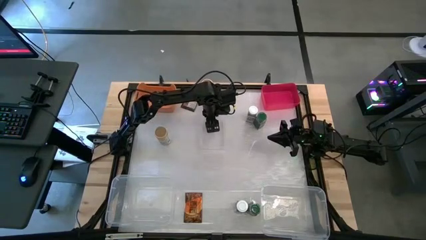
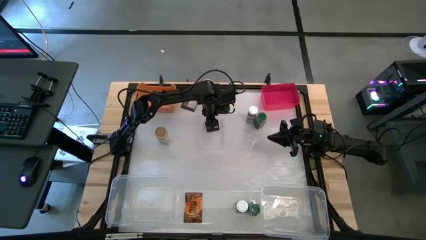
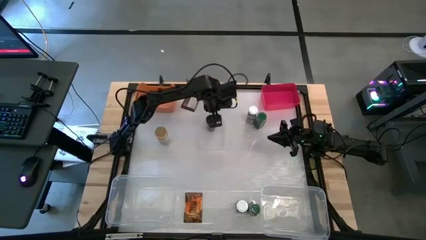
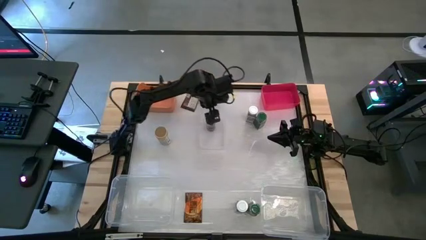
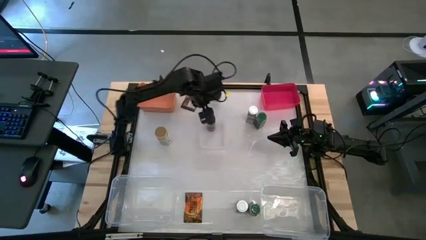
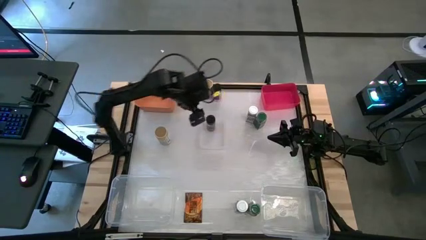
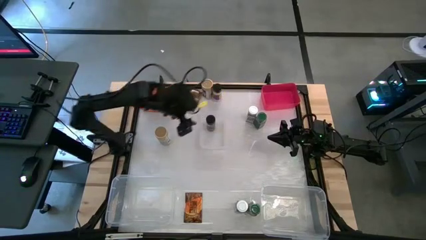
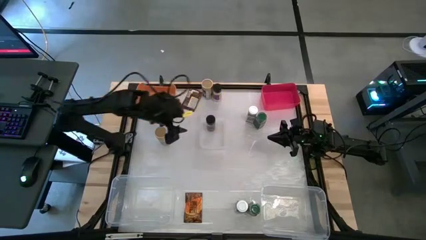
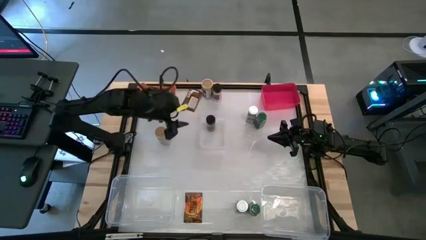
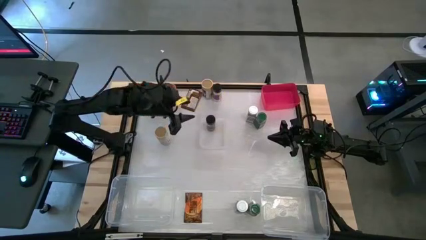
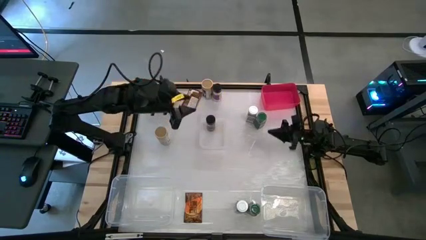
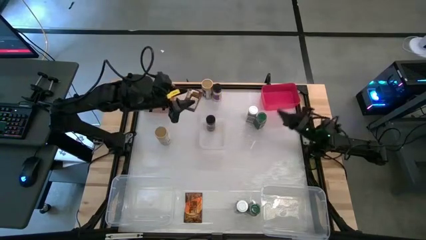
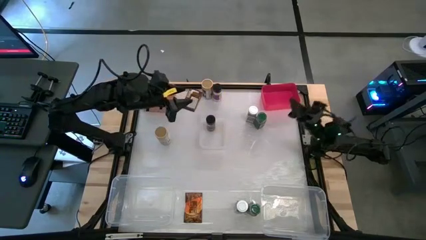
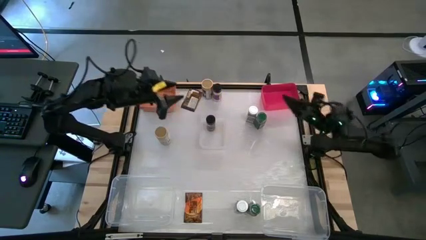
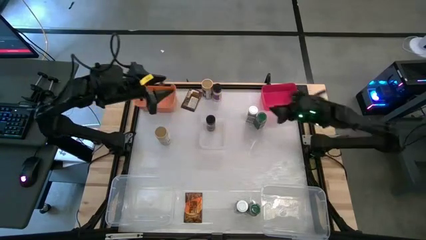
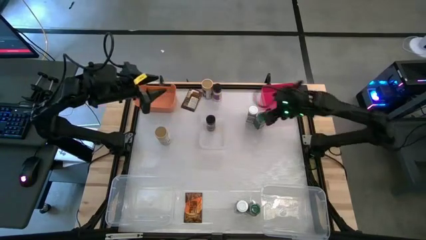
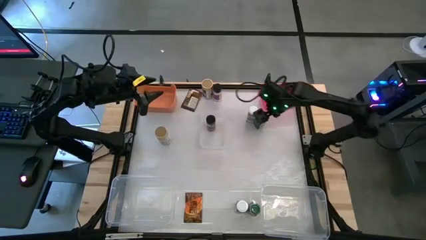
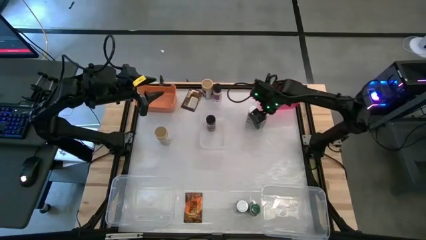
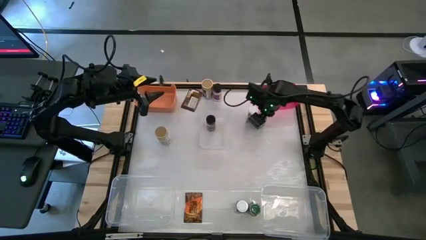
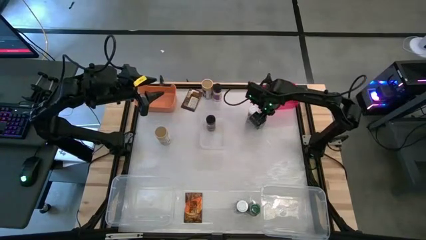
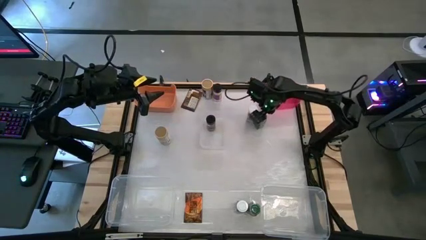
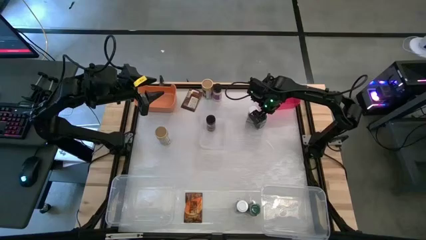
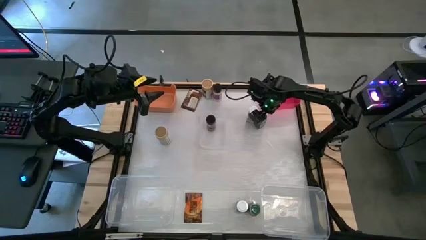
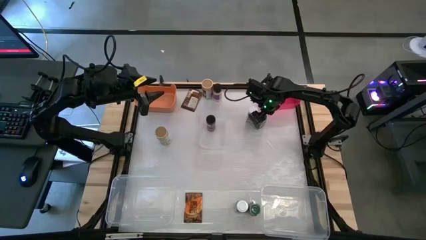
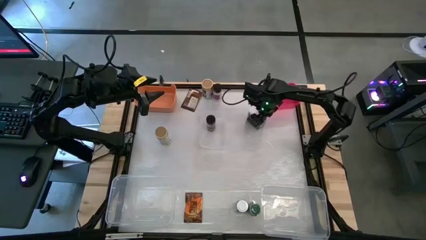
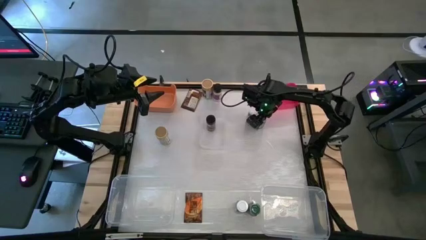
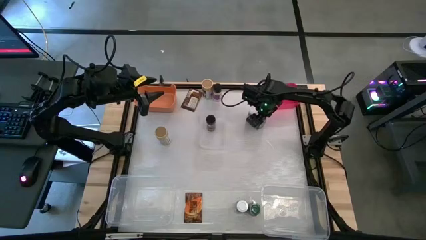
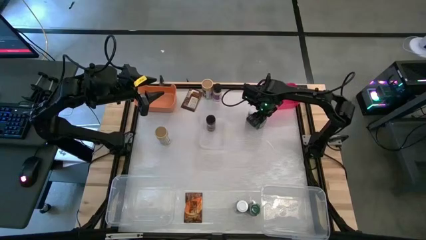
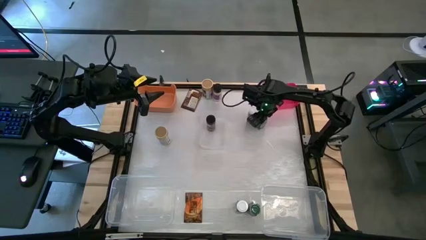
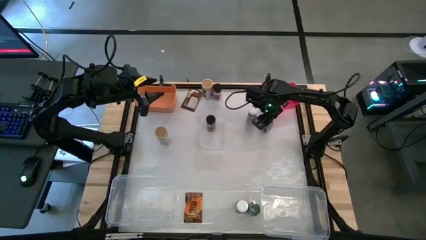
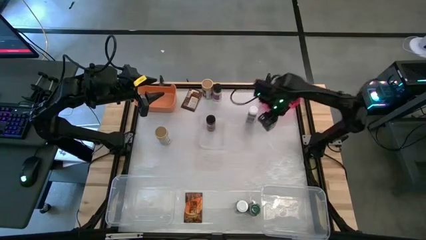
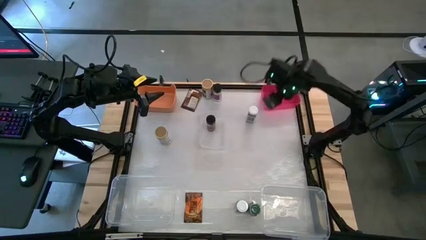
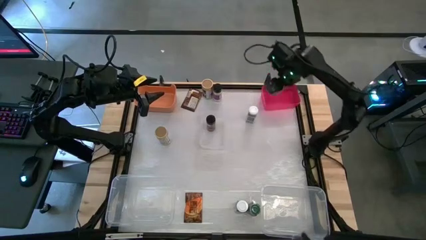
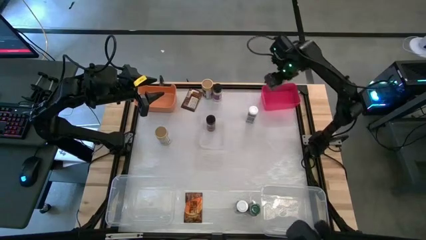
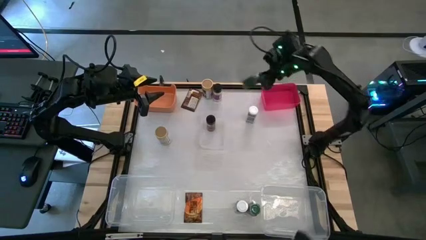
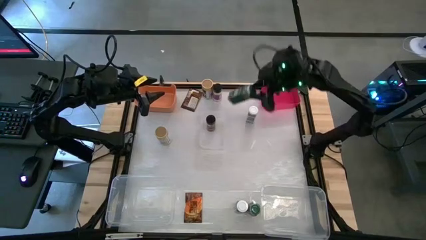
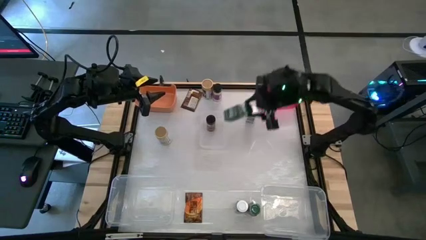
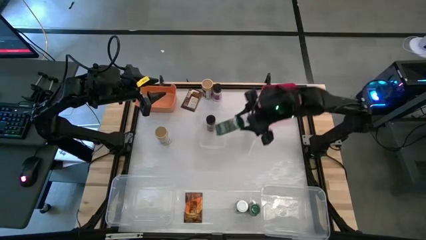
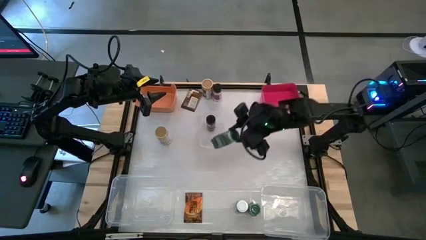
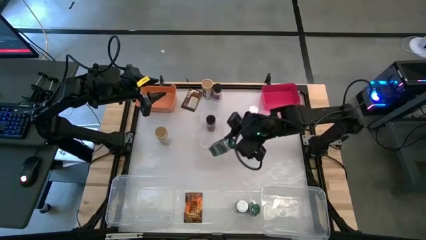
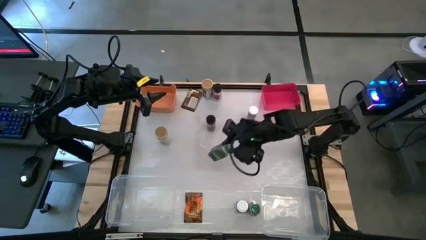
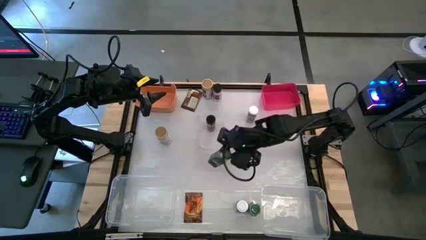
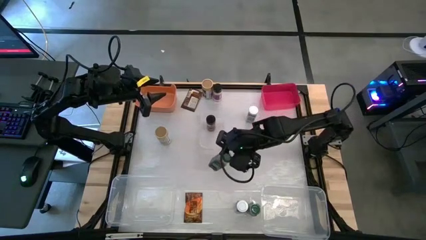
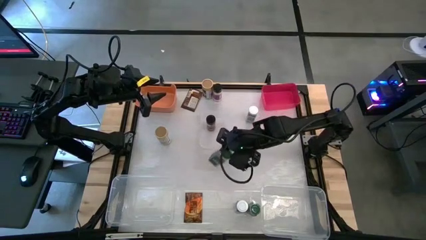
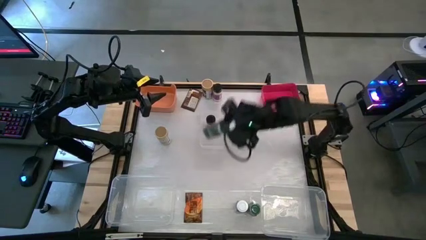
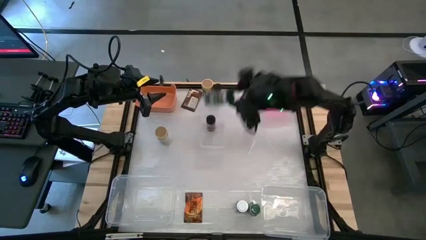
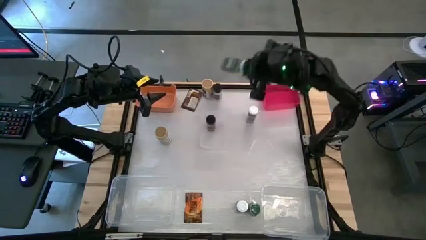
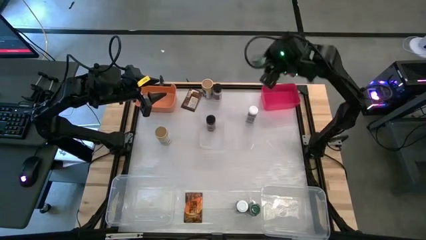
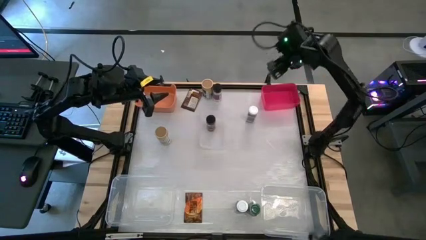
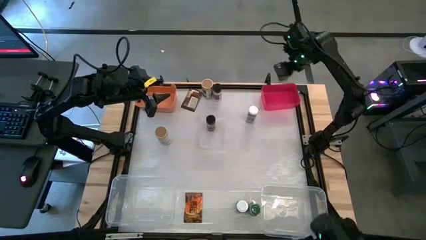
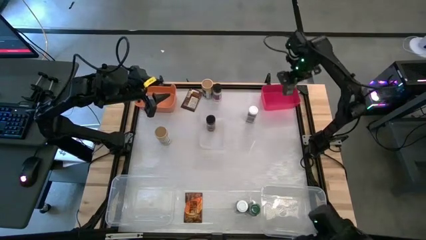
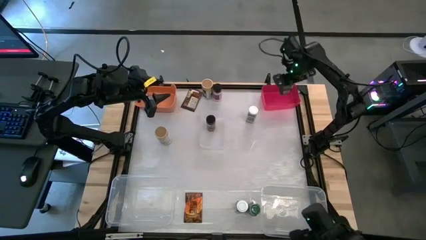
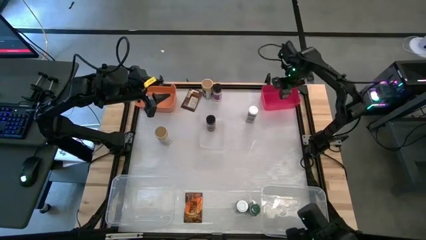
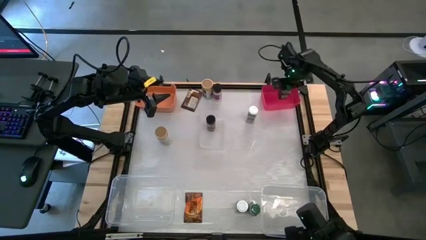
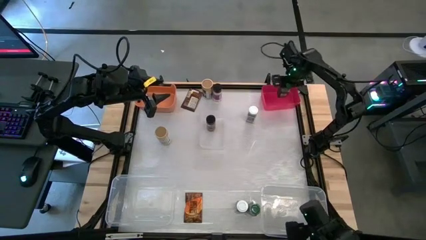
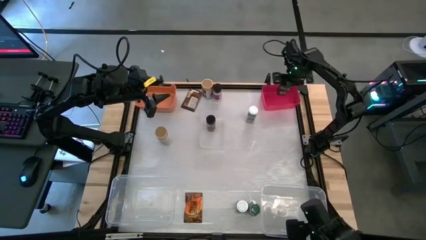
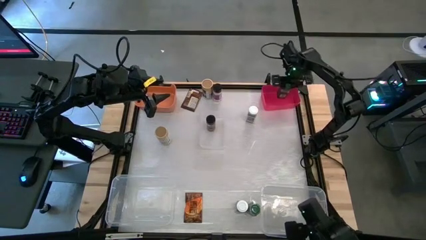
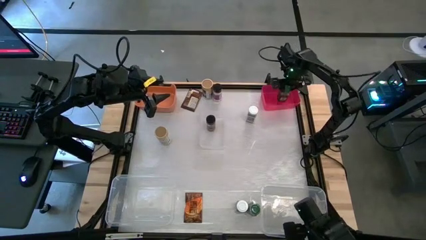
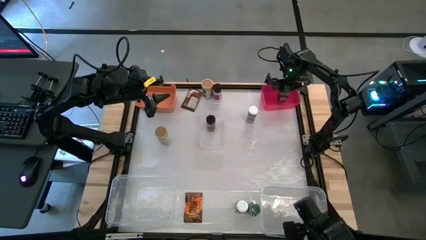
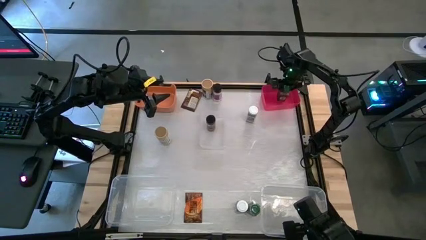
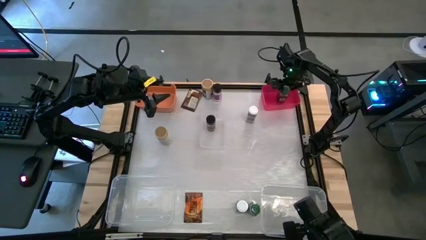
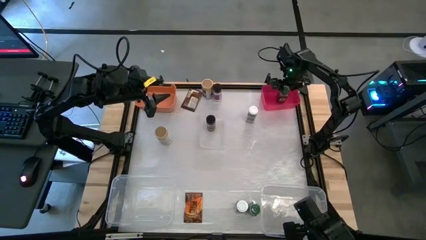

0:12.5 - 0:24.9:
Task: Sort spices by type
Put the top green seasoning bottle into the pink bin

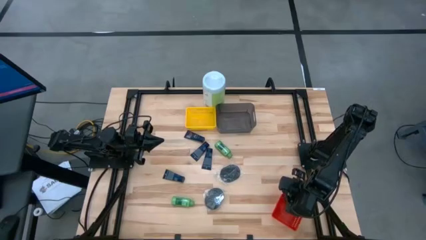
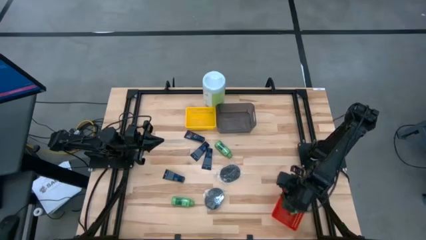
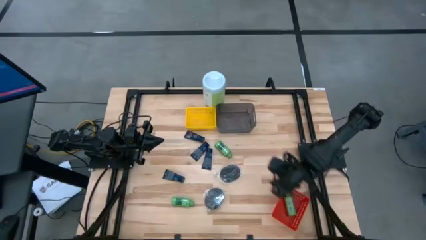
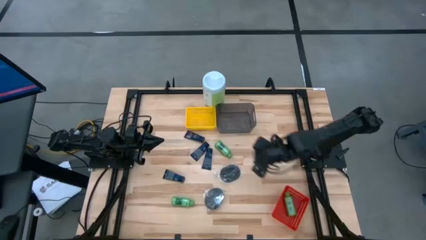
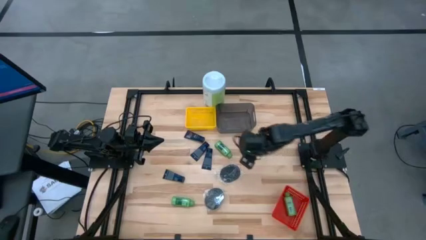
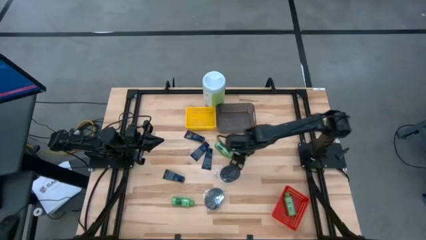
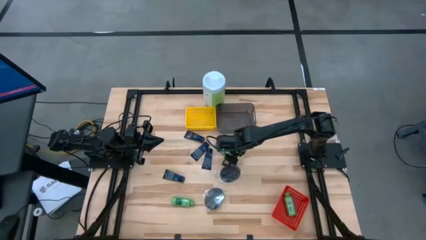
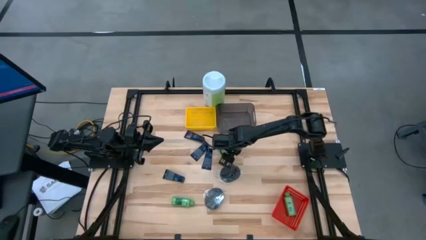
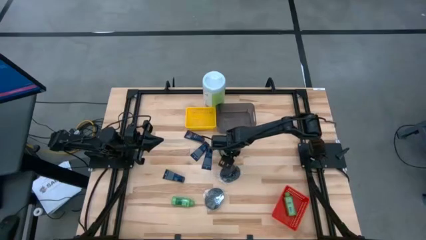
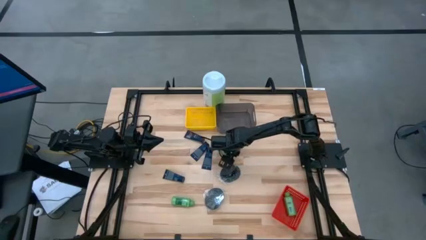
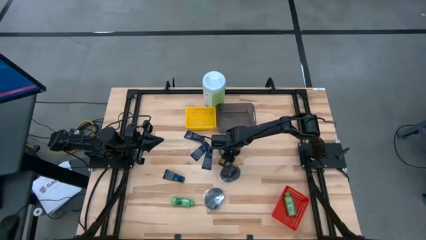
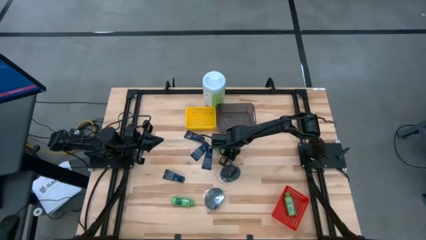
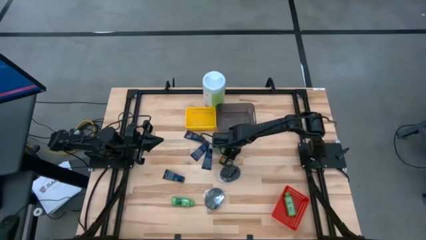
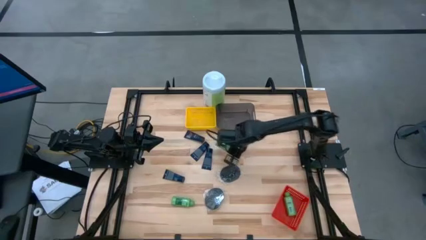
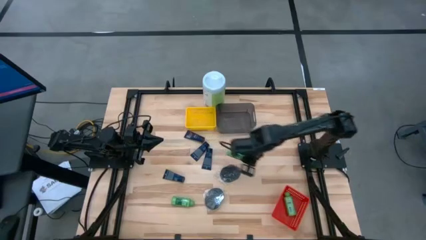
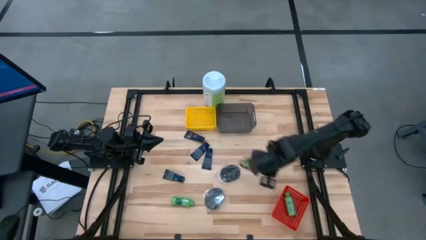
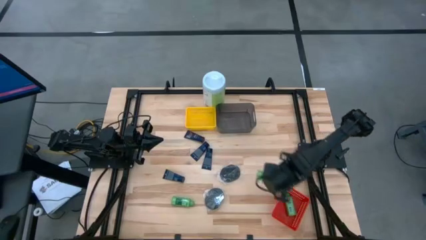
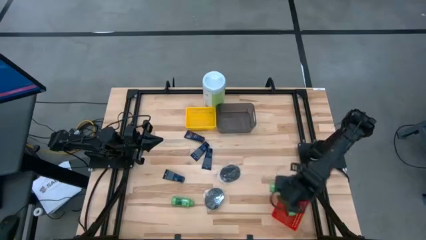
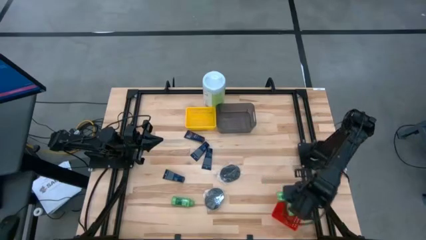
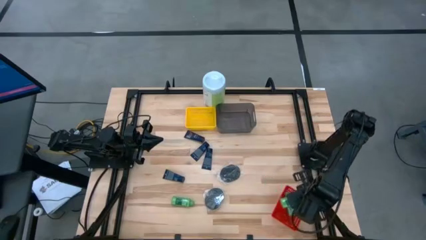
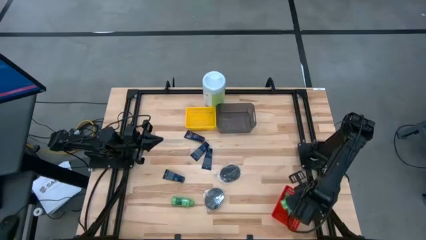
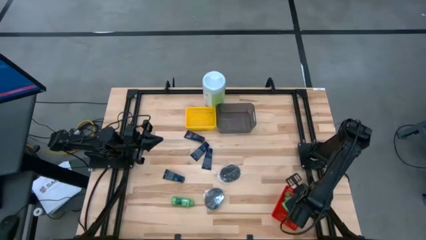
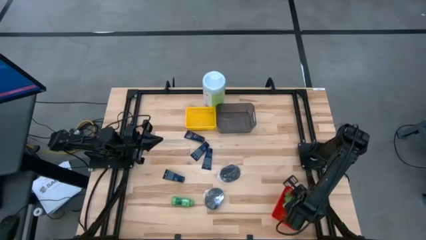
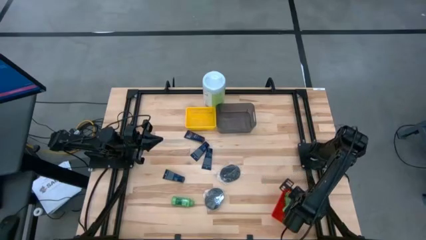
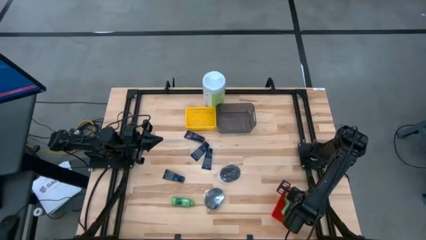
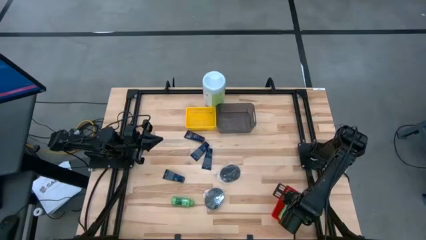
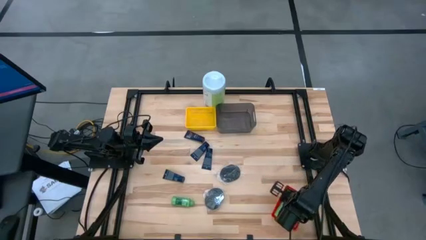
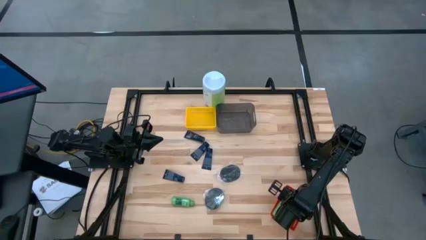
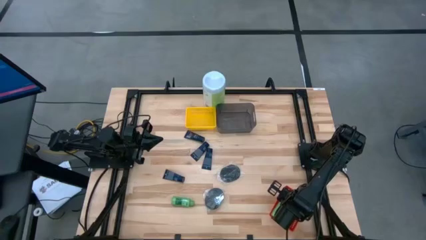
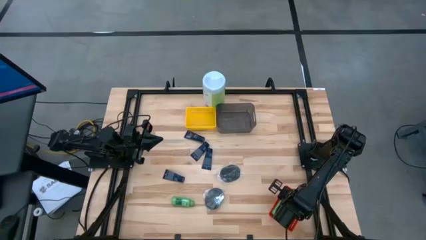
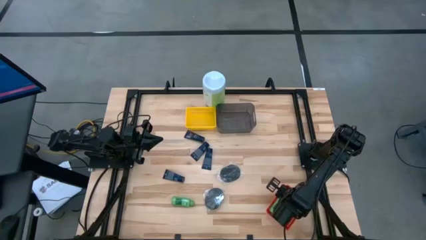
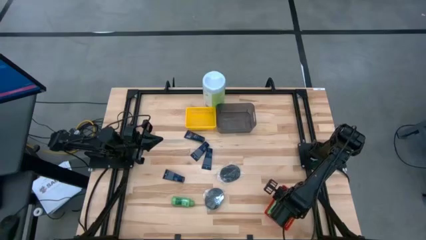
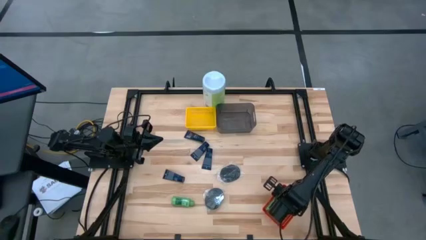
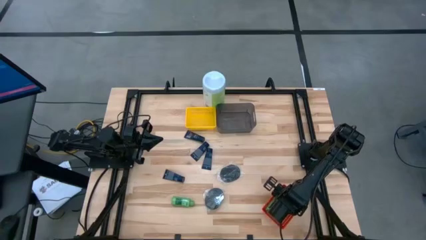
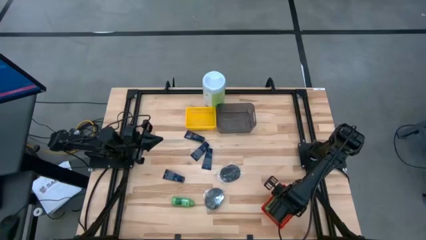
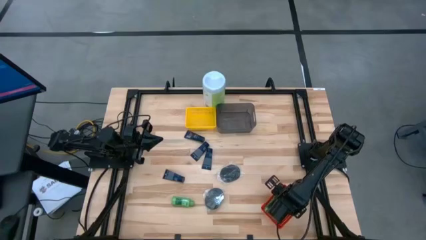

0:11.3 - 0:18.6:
Task: Pick & Place Travel size toiletries
Put the green shampoo bottle into the red basket
